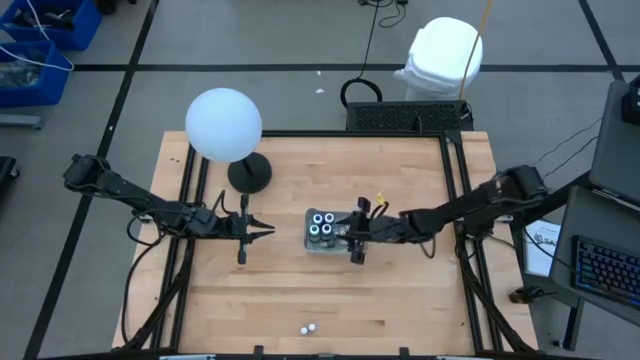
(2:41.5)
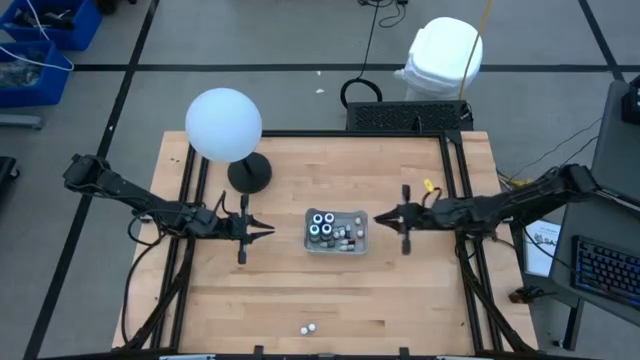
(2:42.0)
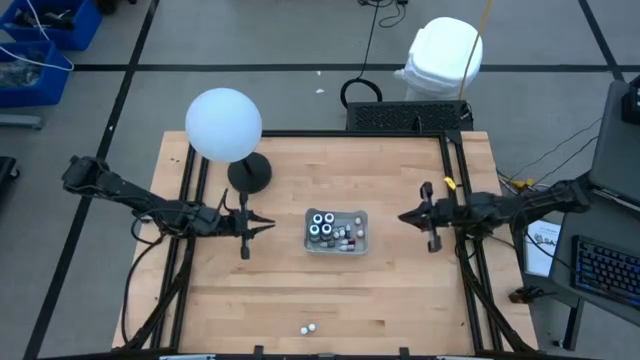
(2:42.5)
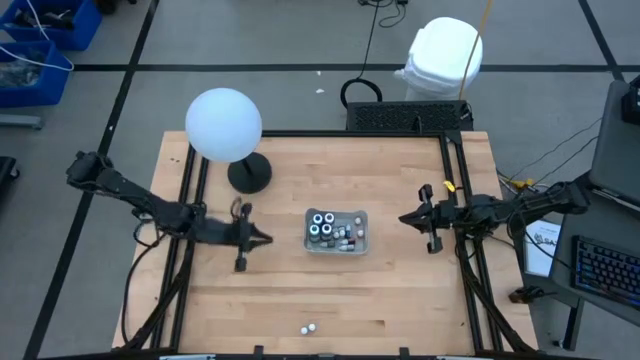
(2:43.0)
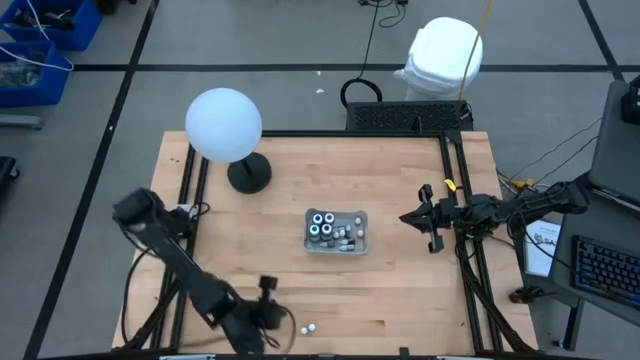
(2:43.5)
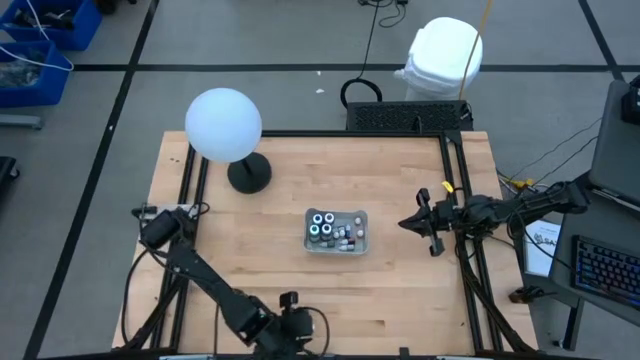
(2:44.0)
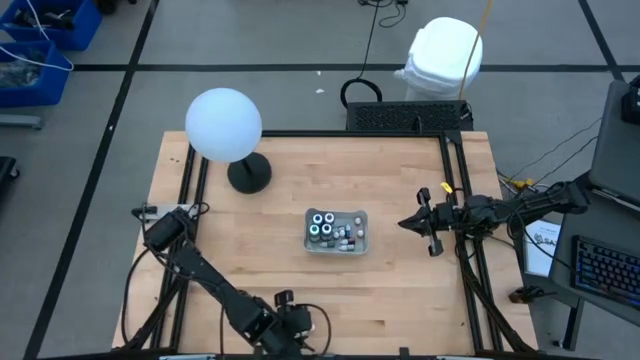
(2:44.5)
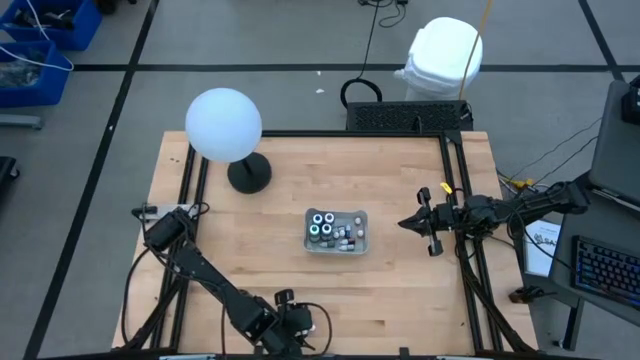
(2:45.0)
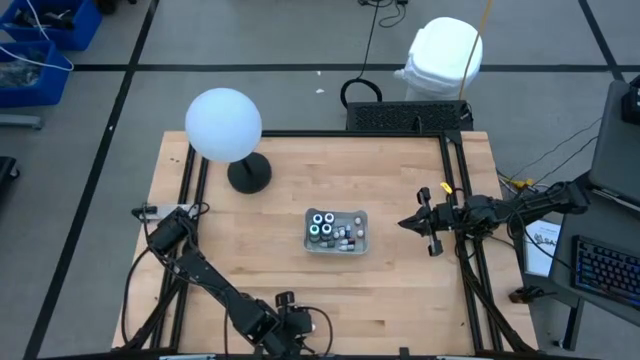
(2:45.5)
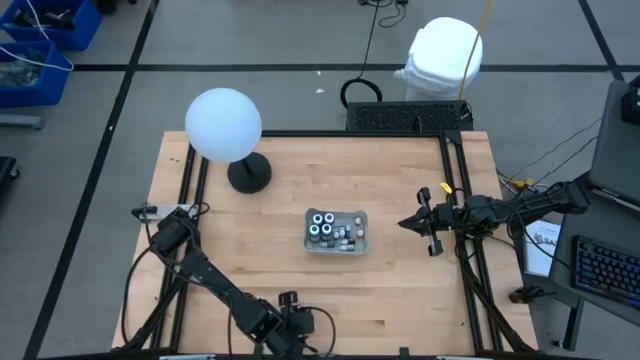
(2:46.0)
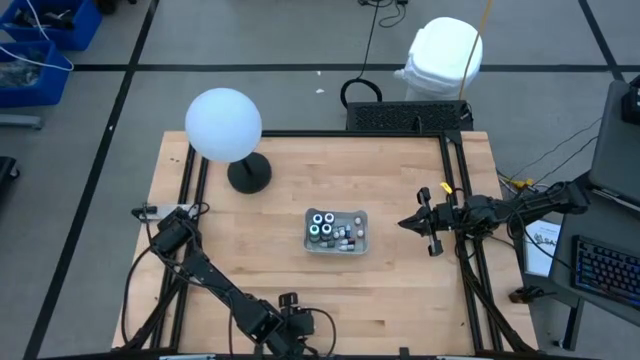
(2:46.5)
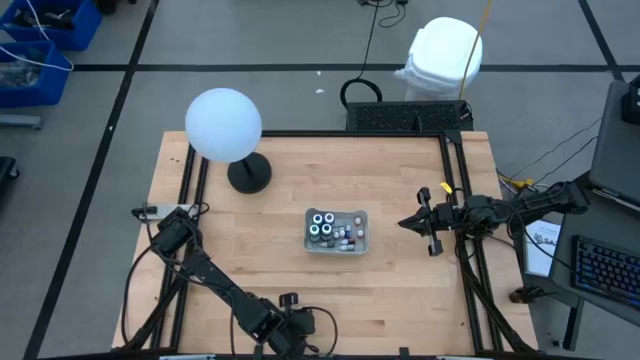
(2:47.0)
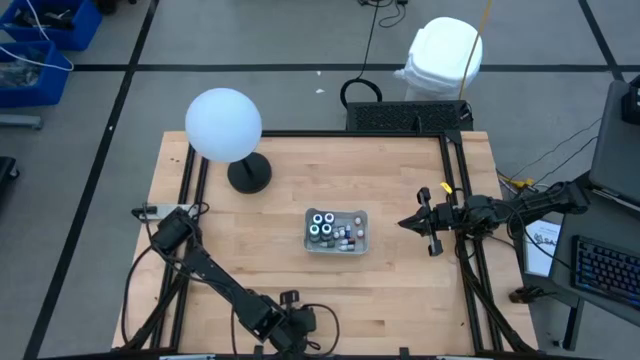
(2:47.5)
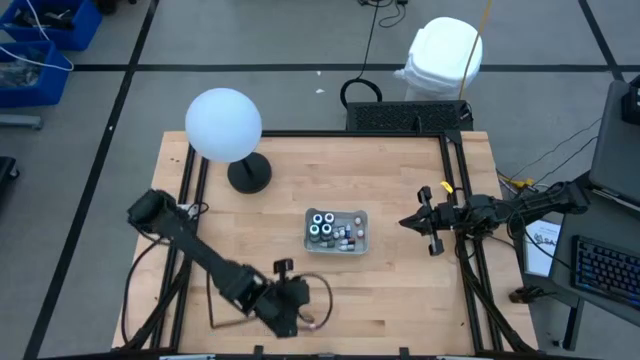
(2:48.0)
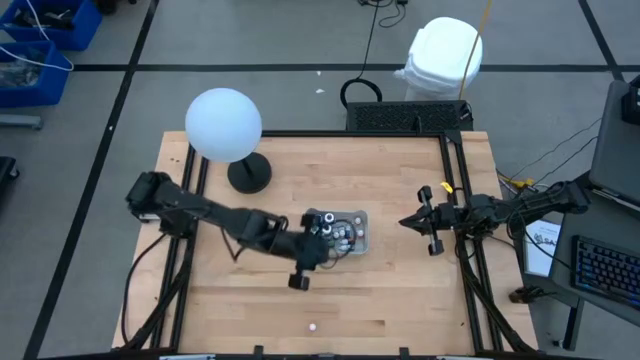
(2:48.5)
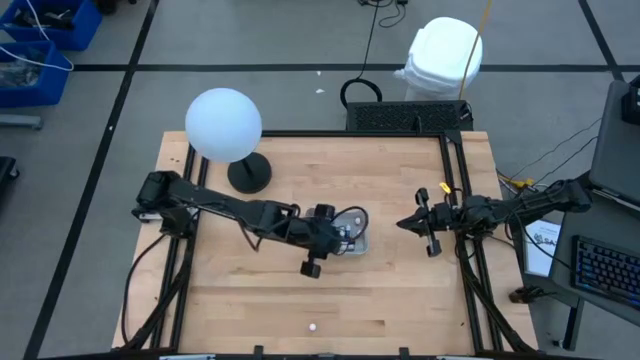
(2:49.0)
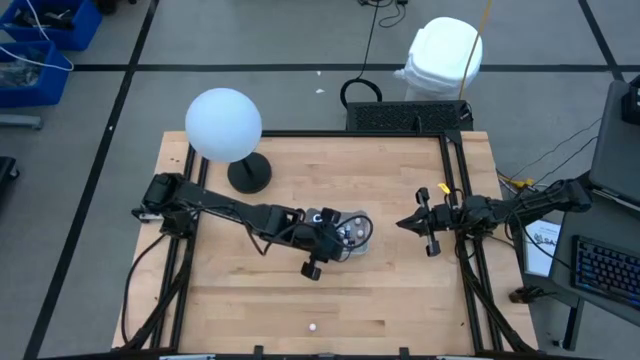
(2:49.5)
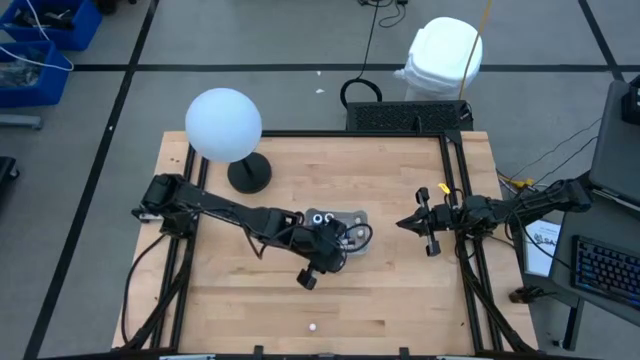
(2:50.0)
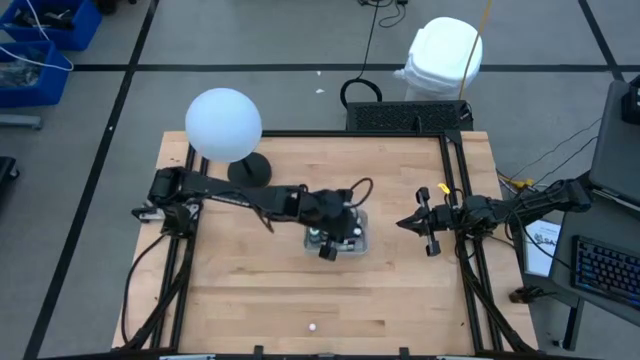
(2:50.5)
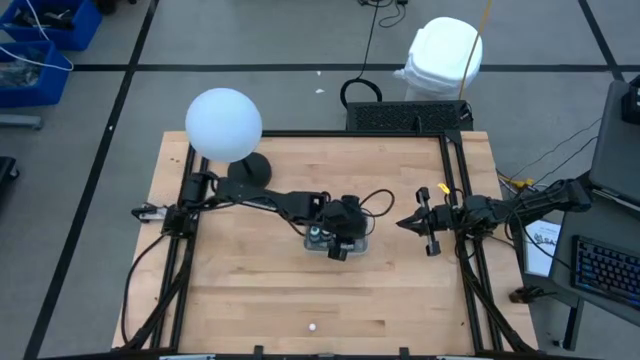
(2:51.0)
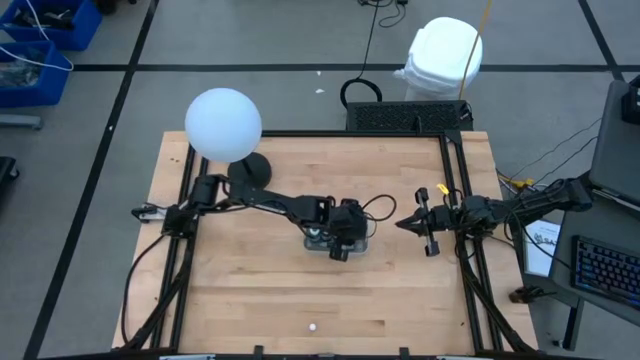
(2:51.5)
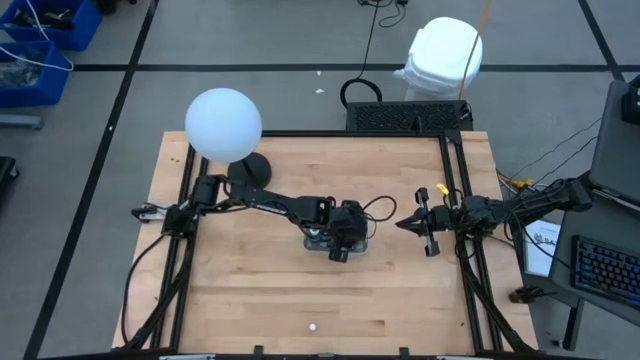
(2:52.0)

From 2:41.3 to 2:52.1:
Task: Pick & Place food coloring
Put the small violet food coloring bottle into the gray bin

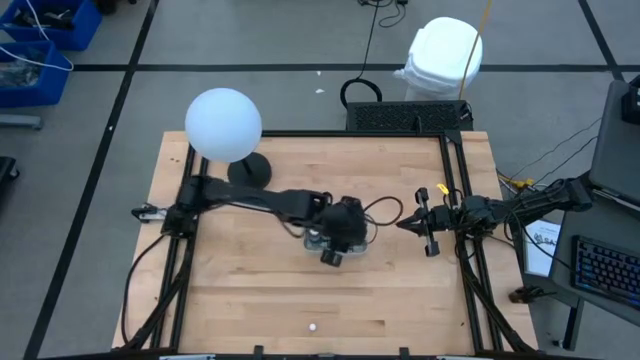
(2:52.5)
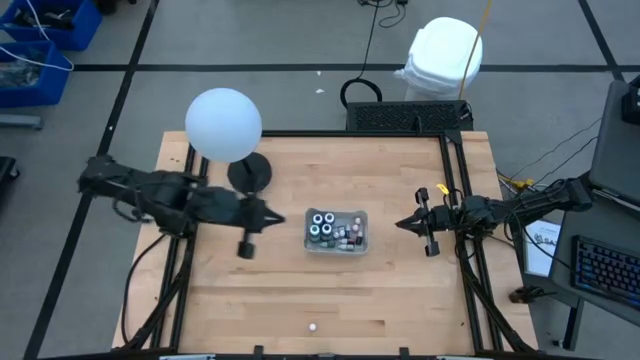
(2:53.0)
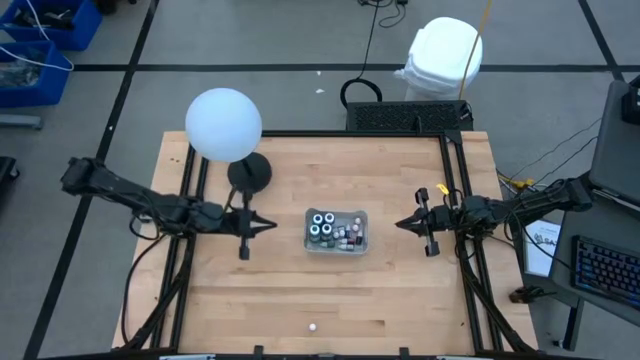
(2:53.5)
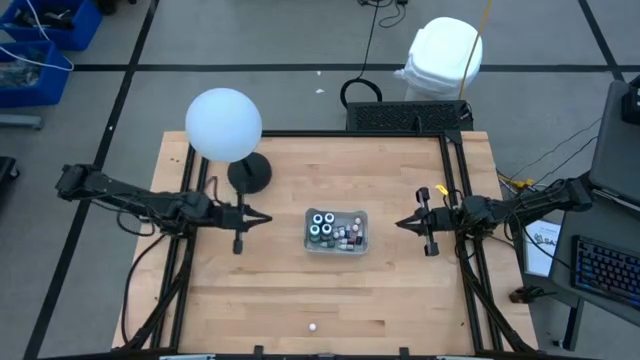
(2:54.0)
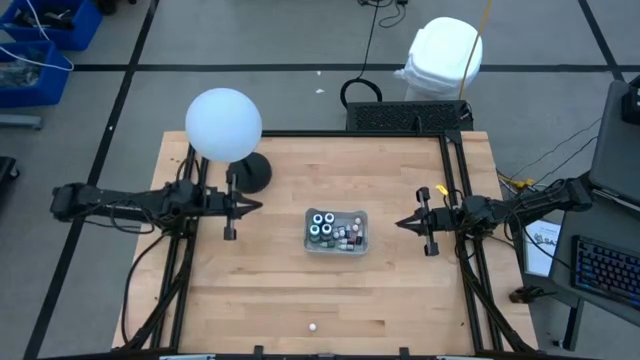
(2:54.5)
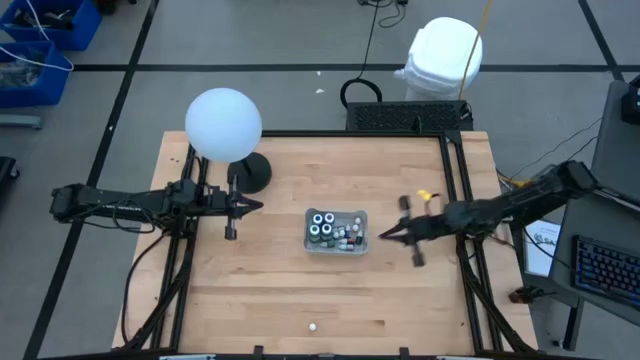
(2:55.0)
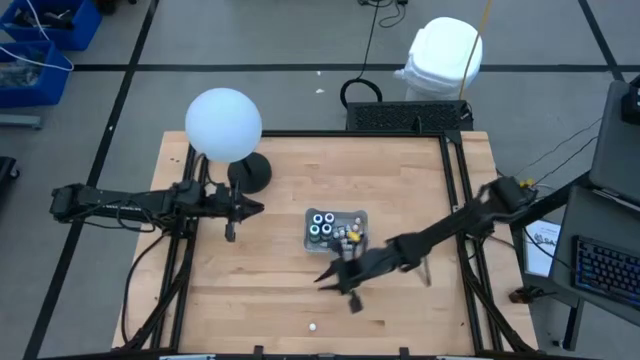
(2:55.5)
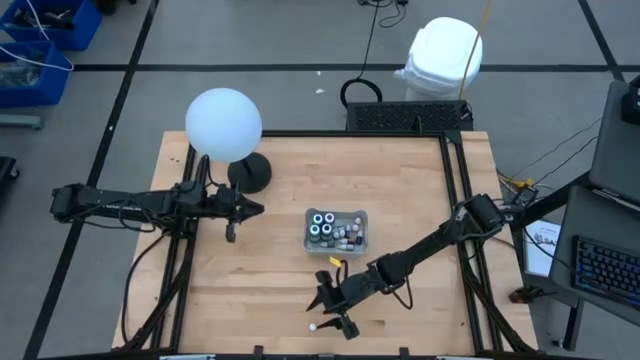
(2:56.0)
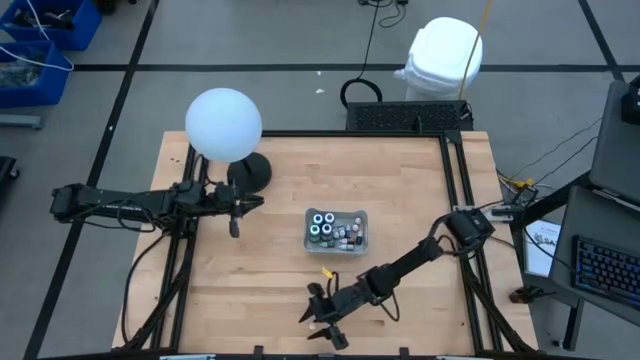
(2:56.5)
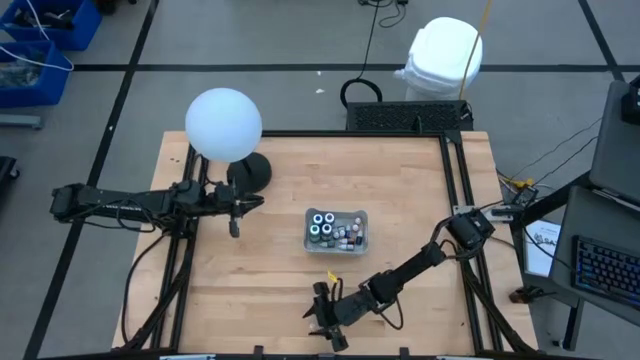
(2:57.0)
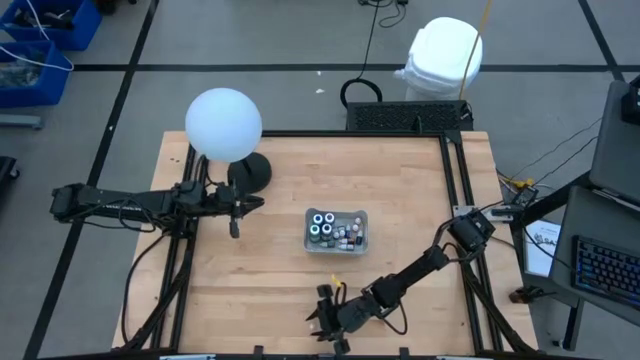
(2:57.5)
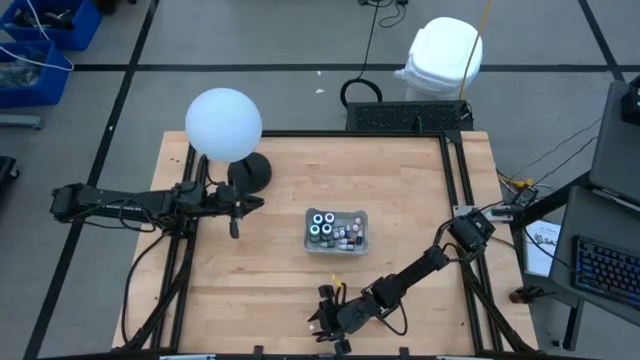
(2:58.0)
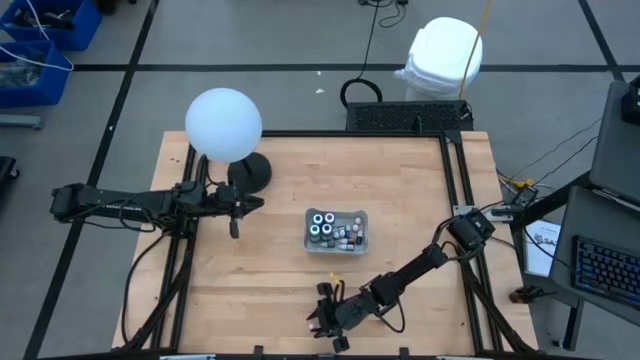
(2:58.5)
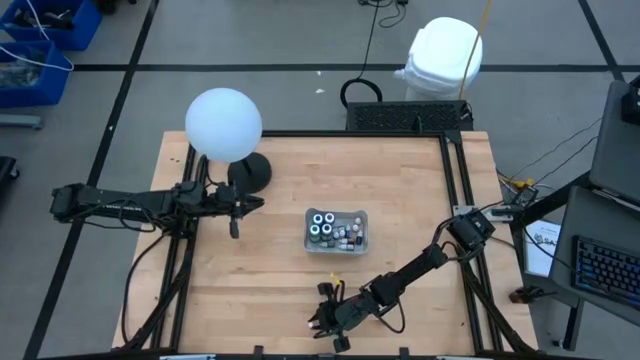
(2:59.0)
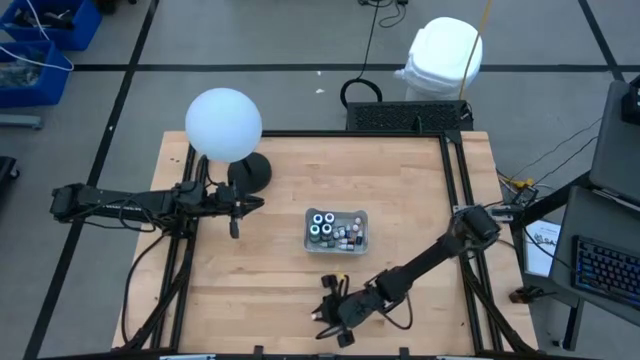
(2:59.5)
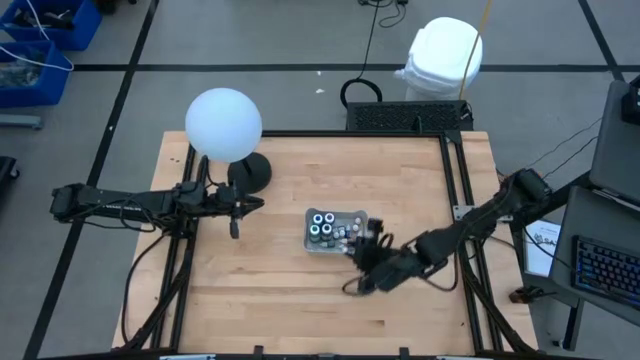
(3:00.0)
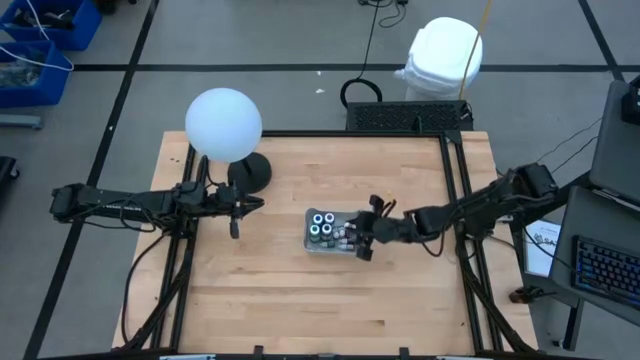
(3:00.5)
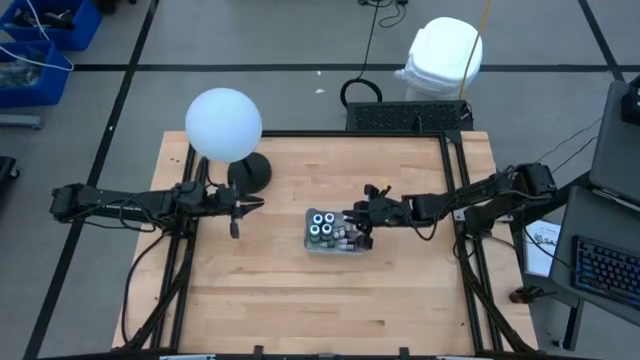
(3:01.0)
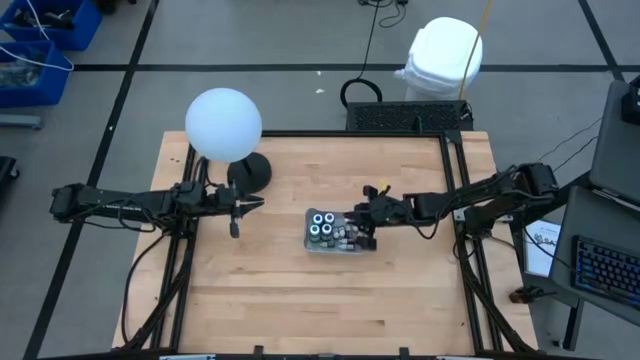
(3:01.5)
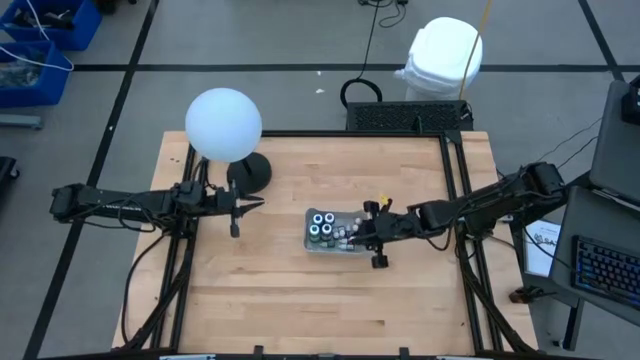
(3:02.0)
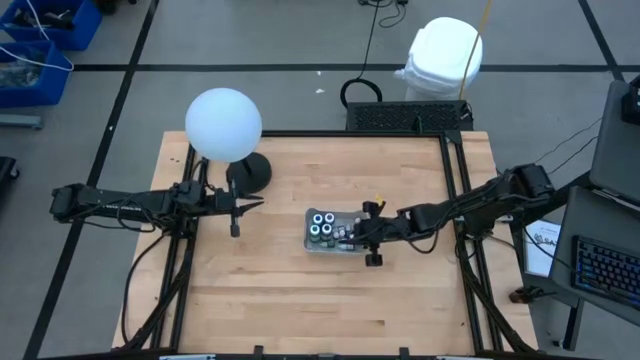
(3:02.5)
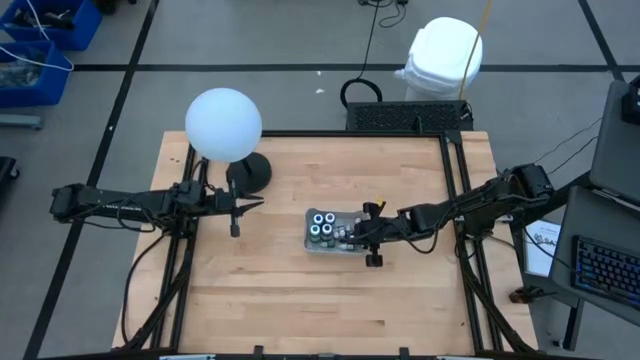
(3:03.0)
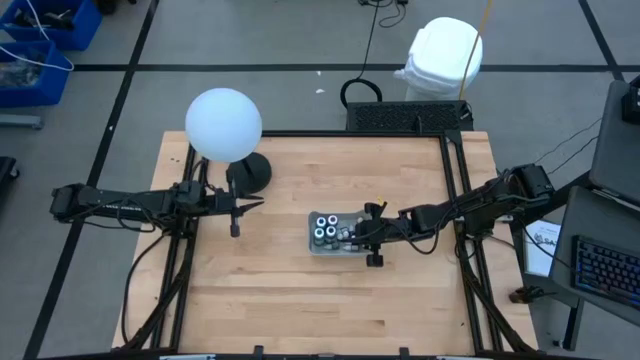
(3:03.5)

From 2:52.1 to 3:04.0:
Put the small yellow food coloring bottle into the gray bin
